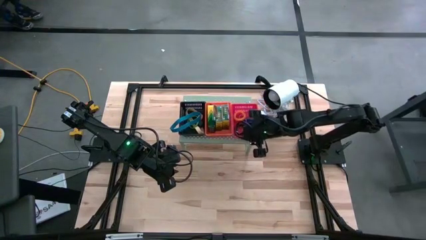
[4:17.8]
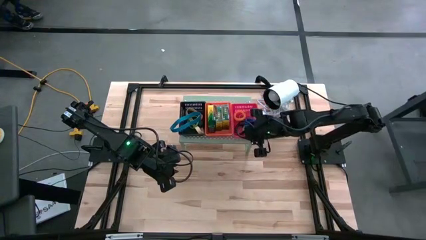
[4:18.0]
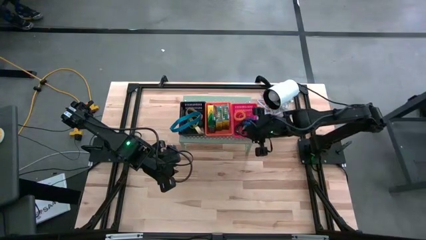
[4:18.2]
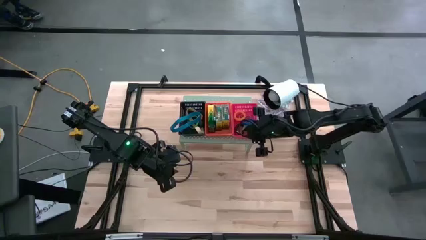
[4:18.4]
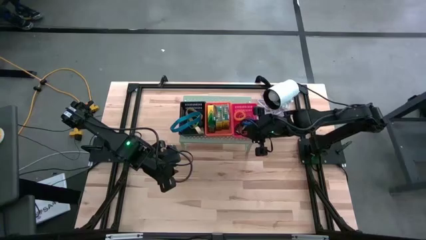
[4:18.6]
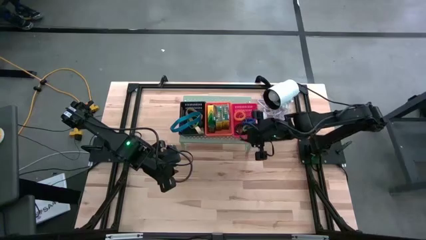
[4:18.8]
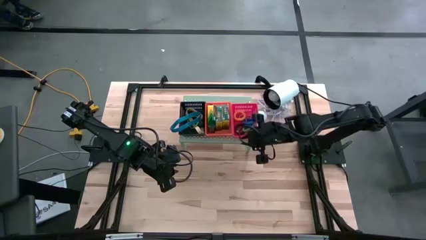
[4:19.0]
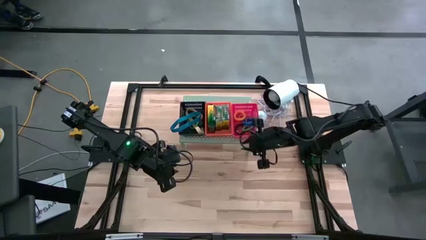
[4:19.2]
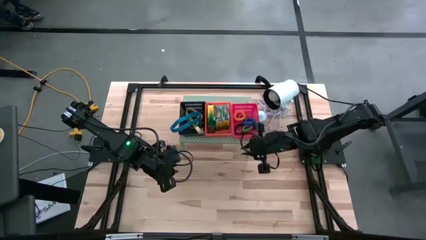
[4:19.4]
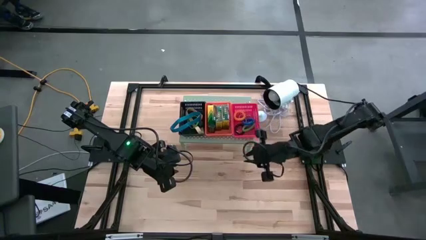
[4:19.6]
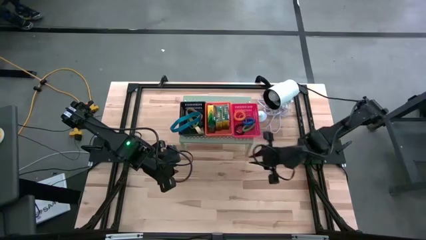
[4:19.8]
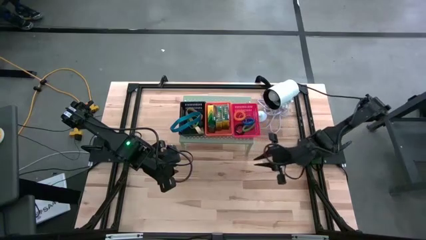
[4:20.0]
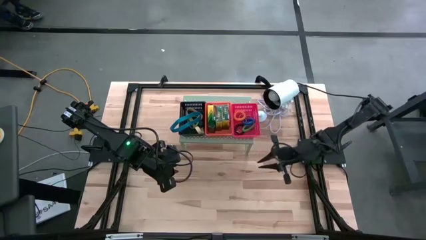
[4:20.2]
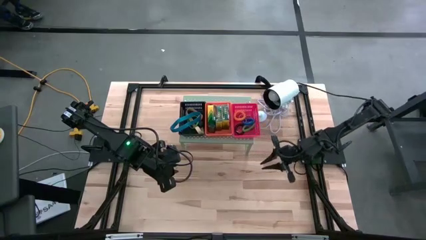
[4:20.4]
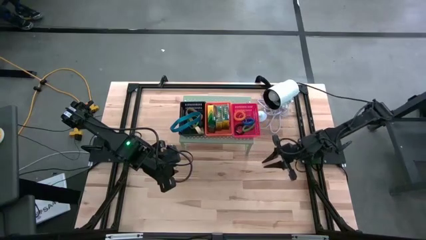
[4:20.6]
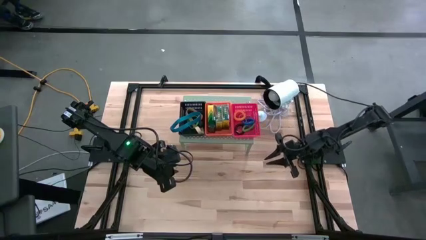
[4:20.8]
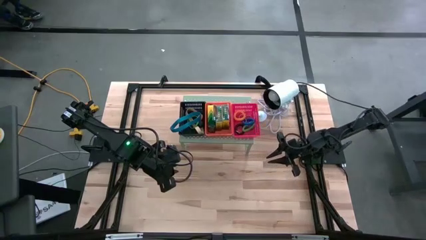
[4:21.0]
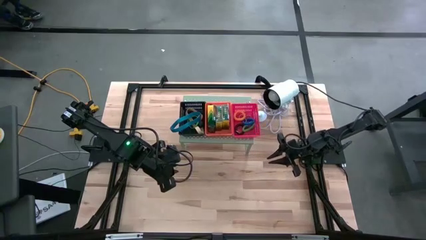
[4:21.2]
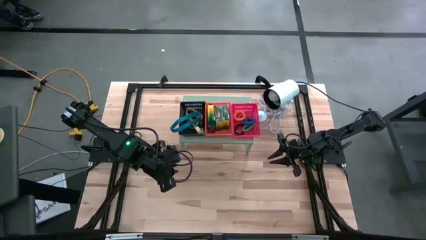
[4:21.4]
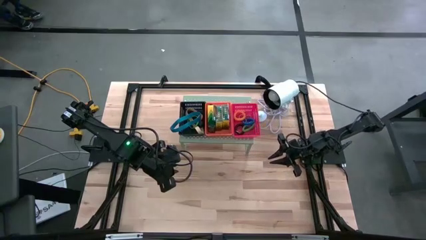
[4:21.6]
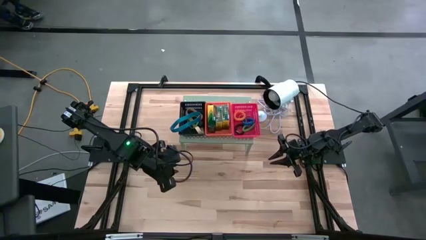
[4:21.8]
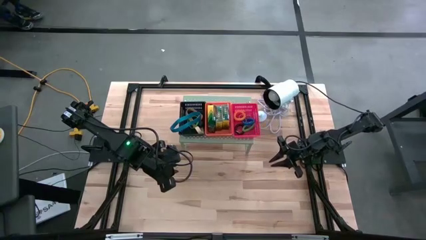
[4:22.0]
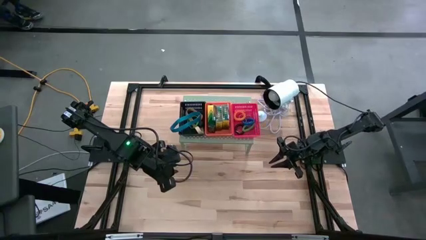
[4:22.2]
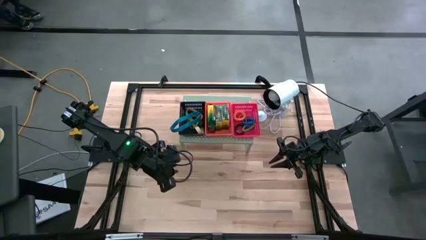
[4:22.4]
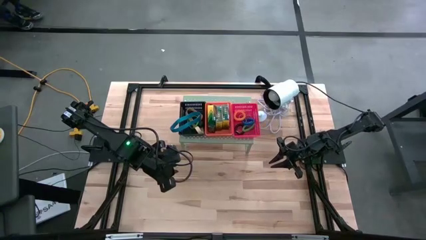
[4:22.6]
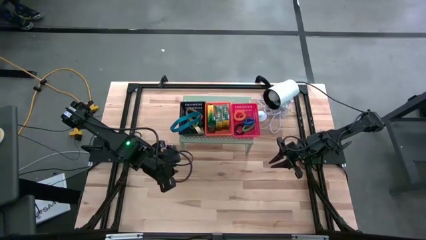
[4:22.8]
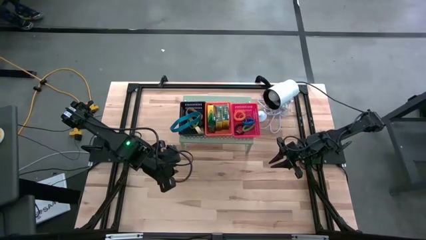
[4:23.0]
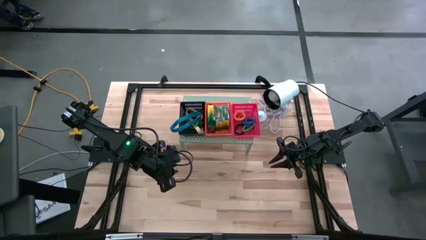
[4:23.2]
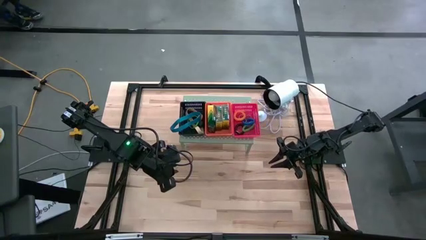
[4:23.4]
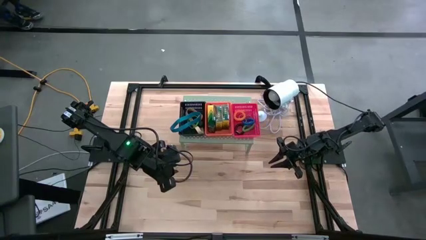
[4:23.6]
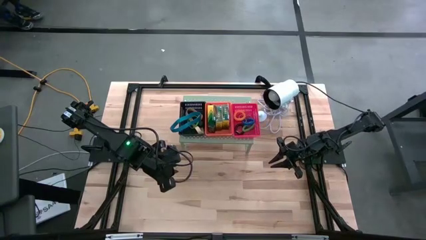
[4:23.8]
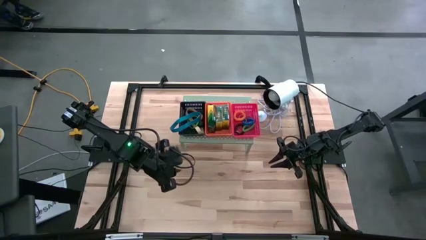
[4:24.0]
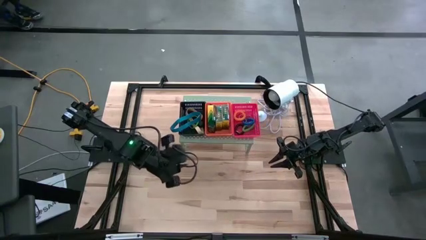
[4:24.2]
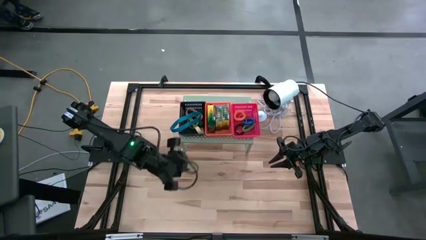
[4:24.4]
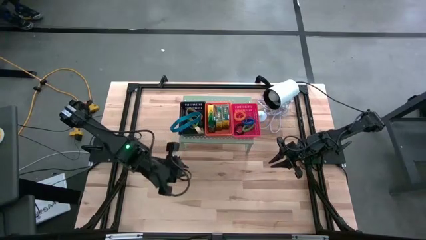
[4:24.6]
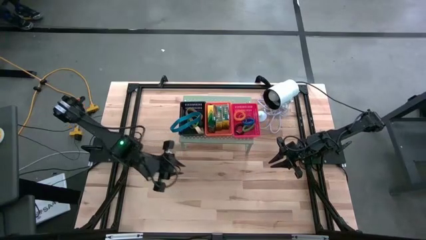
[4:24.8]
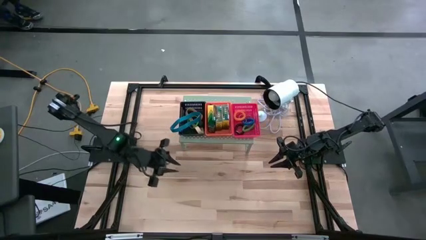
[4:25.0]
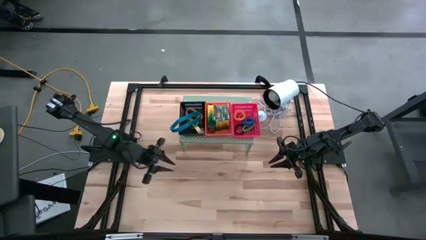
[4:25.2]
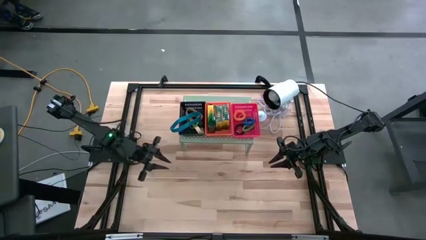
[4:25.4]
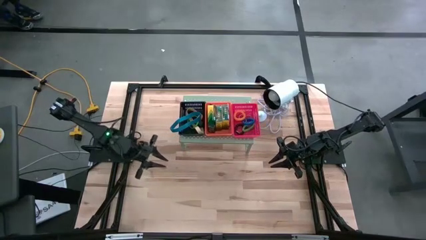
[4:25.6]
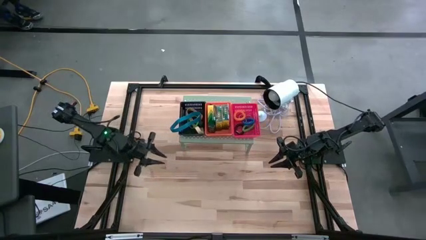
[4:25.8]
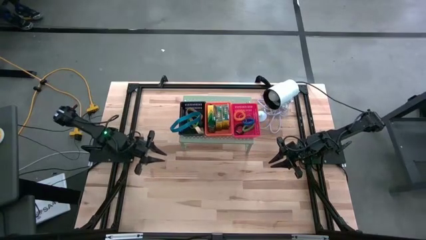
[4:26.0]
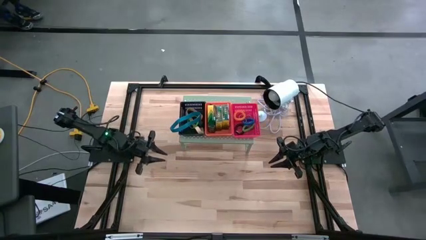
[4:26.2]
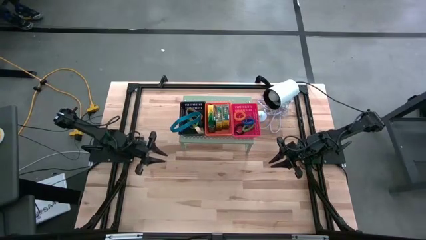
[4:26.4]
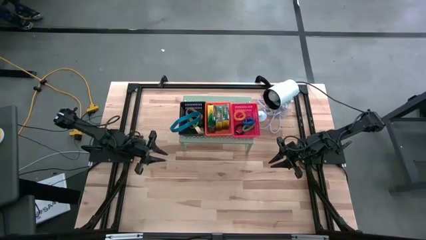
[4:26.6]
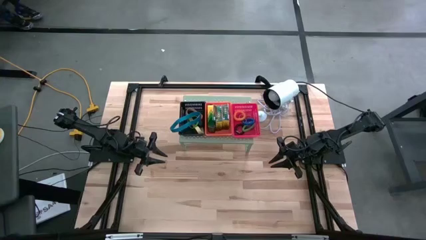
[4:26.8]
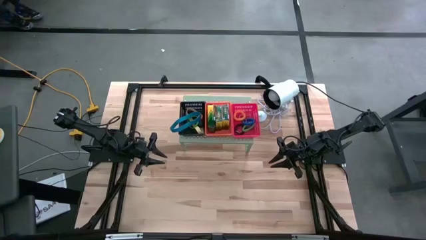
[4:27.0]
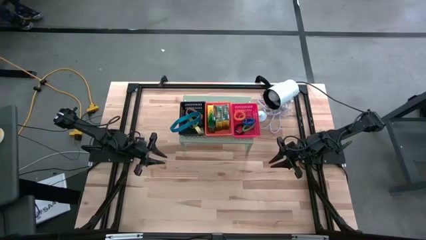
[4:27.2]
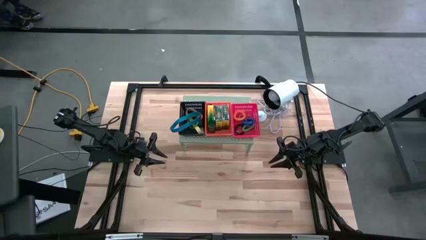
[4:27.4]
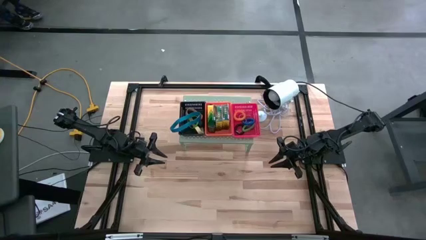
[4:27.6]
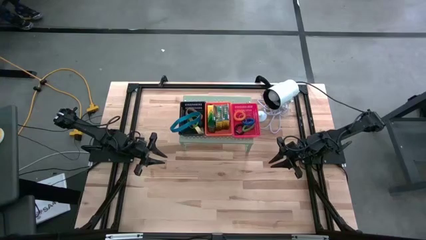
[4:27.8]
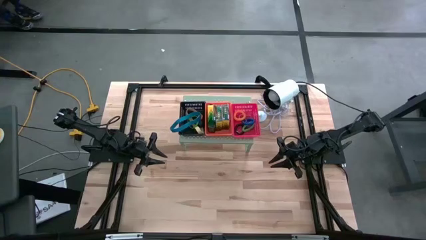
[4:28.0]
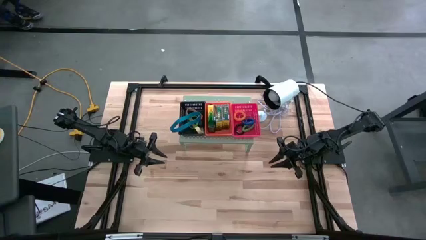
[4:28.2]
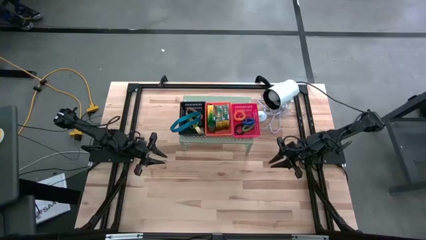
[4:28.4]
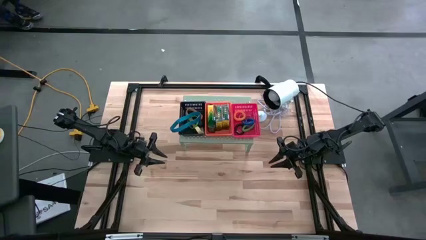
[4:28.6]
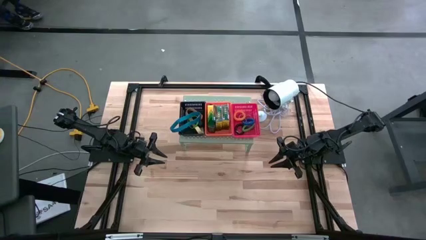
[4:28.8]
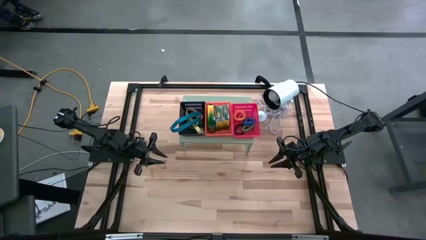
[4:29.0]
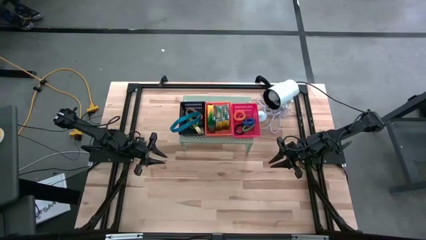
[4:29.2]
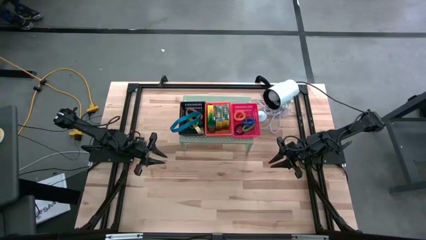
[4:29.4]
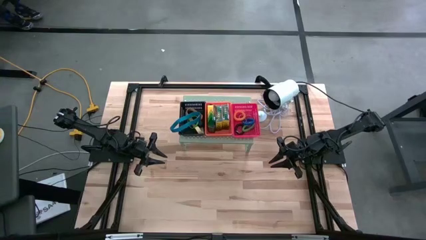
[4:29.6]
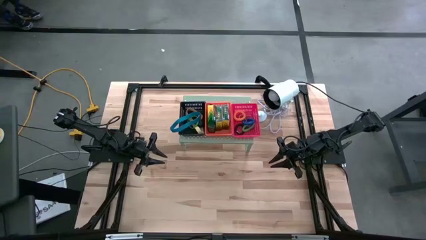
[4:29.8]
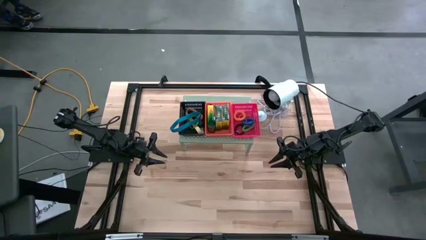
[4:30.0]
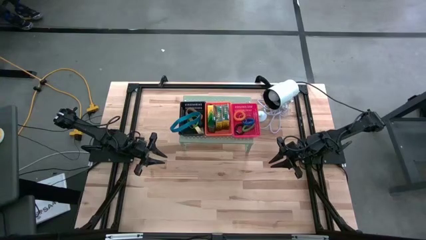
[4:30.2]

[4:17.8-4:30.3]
Task: Pick & Place Office Desk Supplies
Return to Home Position

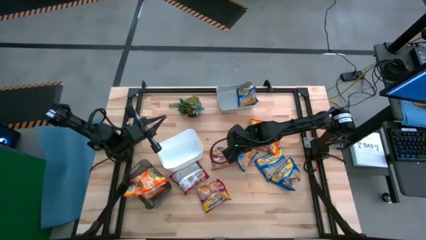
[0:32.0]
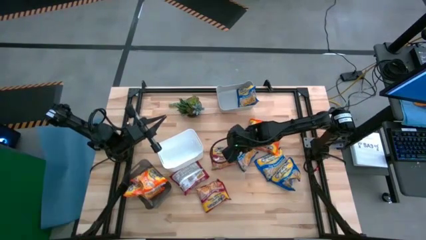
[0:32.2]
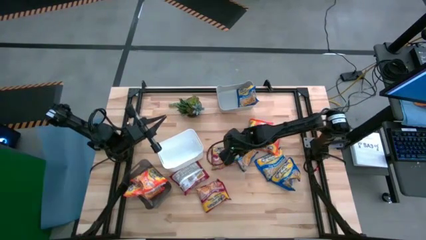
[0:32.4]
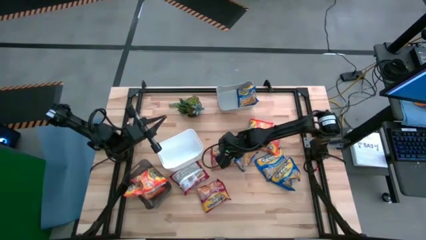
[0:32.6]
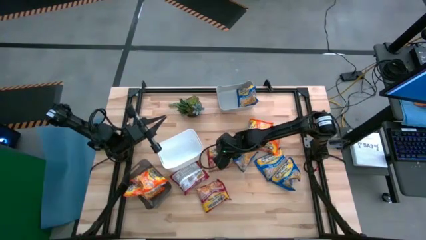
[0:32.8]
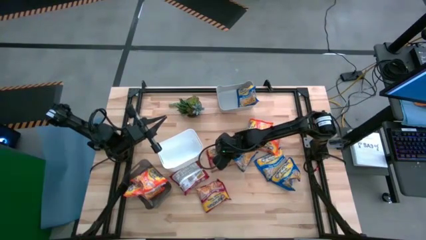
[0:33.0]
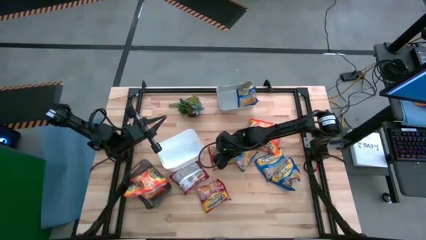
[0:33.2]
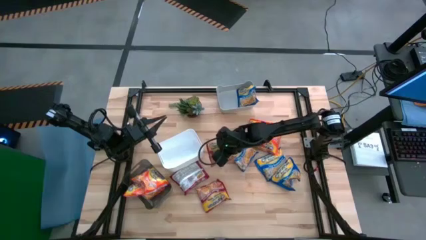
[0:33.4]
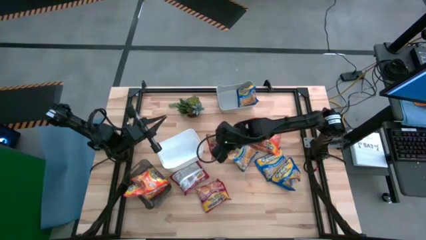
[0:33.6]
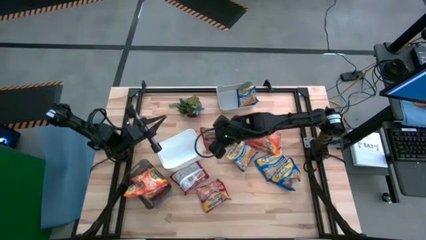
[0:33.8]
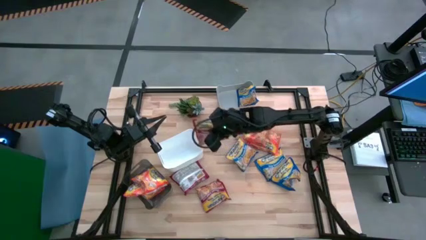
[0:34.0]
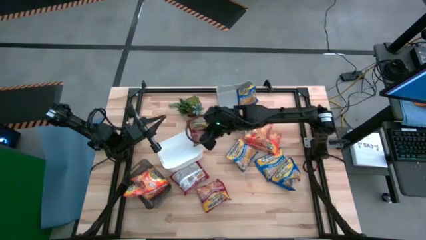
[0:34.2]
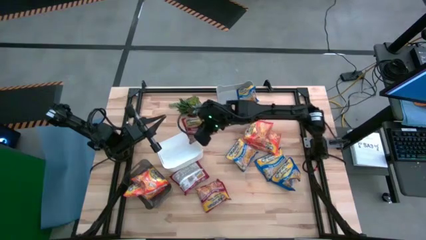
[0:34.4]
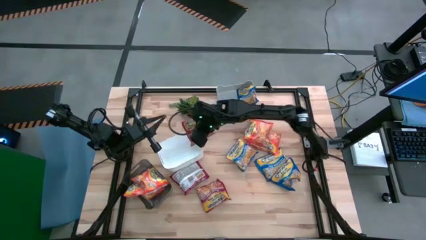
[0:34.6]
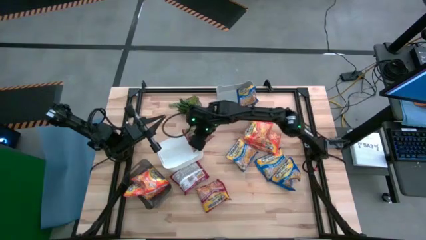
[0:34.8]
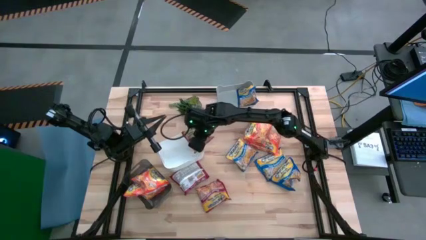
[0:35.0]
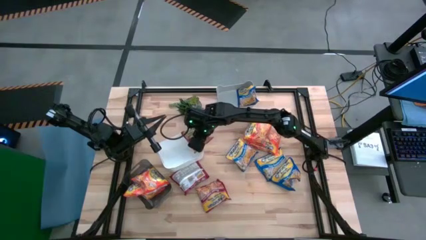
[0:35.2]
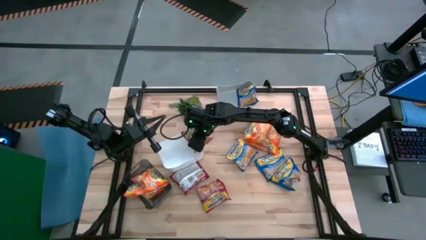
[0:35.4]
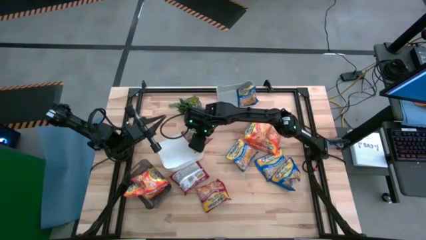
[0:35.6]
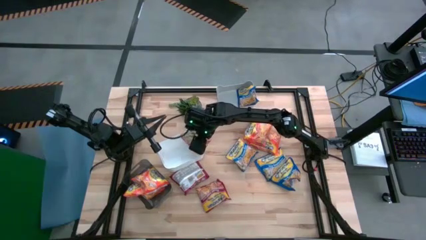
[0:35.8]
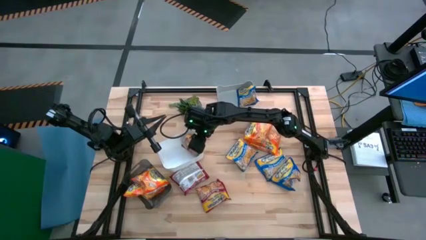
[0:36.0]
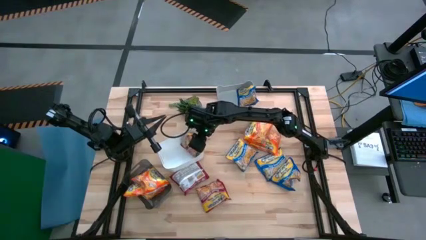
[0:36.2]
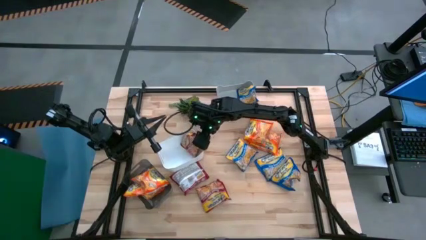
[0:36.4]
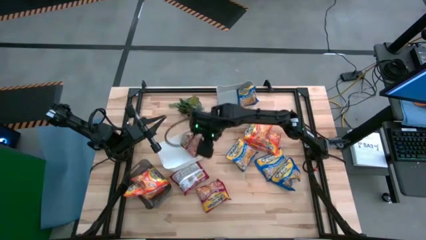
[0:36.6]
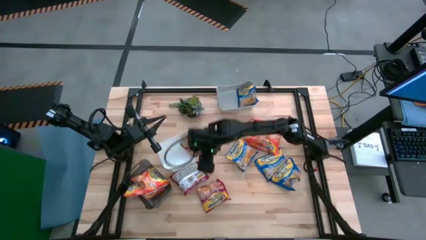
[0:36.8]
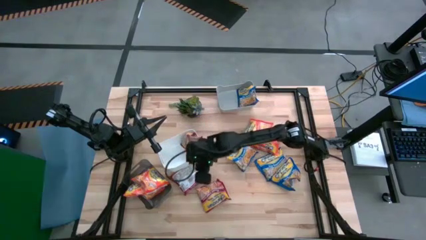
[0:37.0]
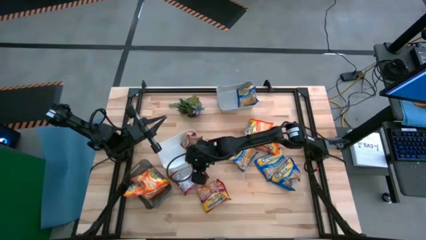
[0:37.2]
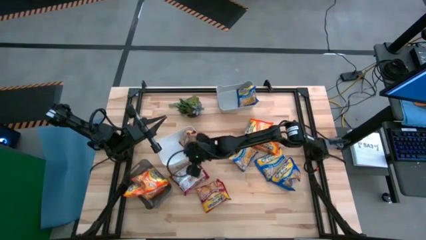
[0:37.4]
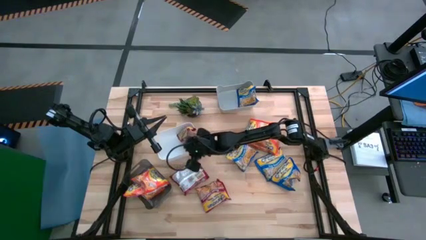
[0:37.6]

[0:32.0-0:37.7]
Task: Sort Maruchan noodles
Put the red noodle pack into the white bin
